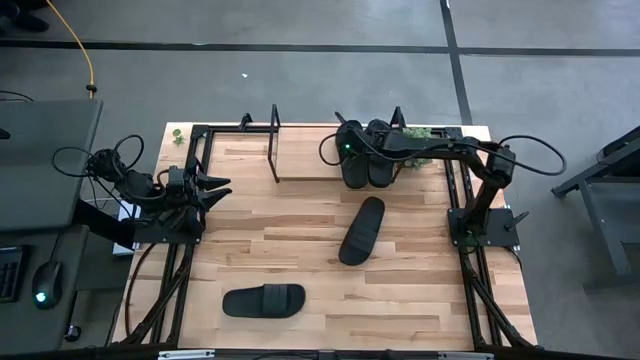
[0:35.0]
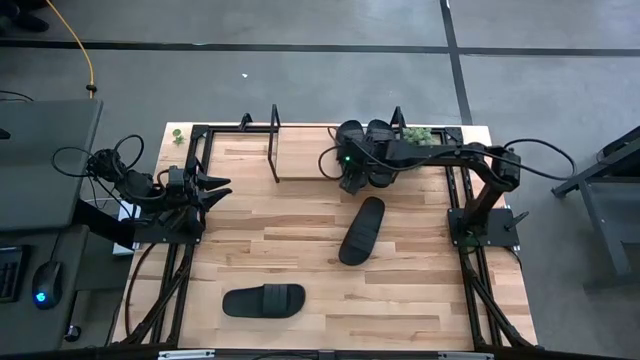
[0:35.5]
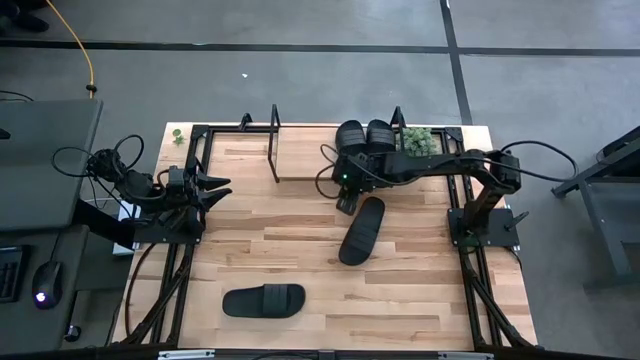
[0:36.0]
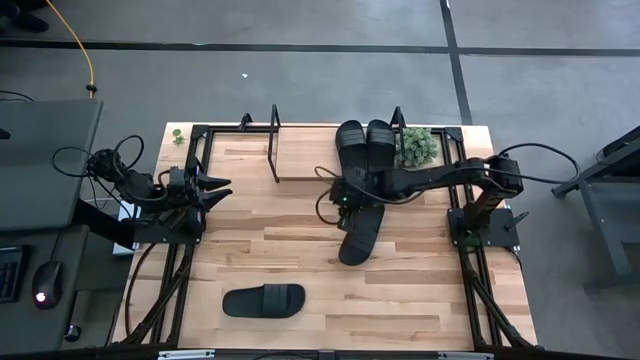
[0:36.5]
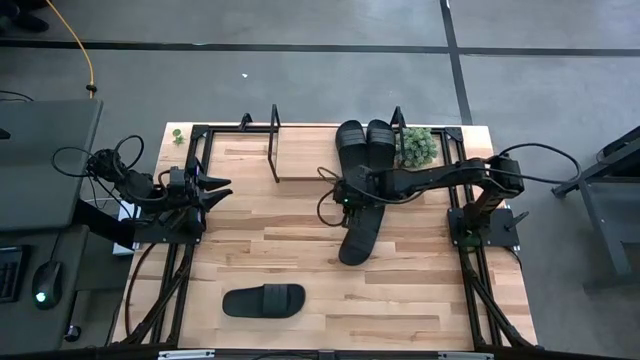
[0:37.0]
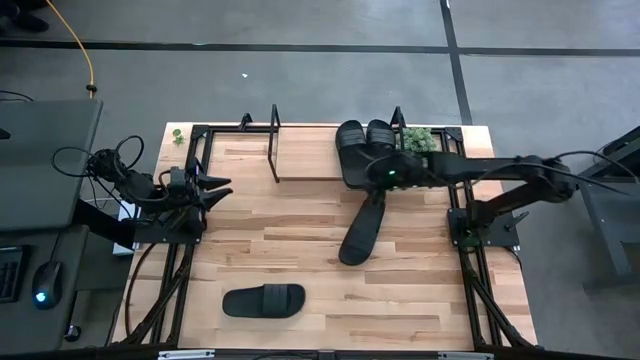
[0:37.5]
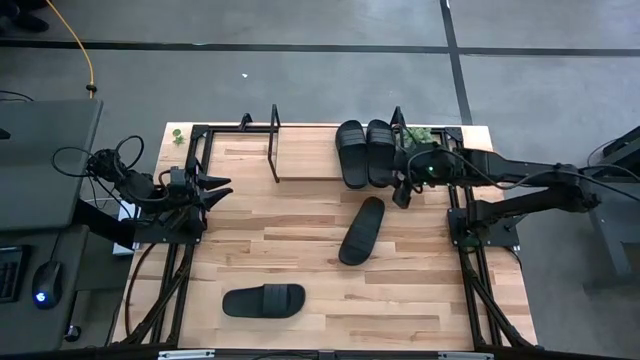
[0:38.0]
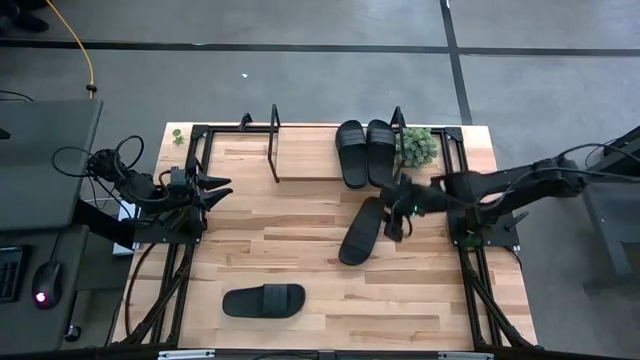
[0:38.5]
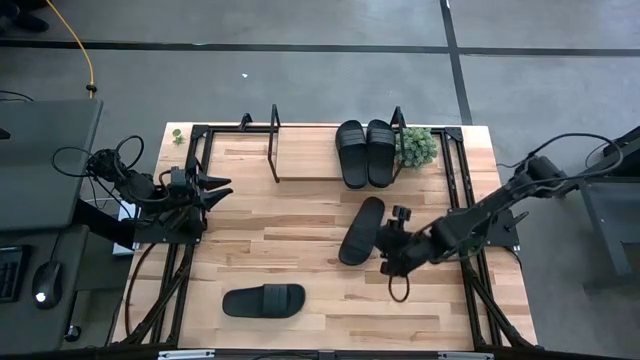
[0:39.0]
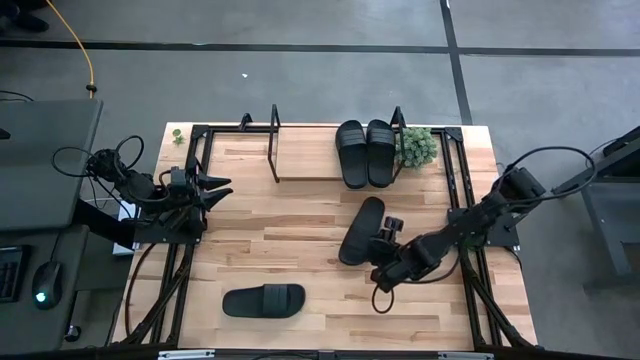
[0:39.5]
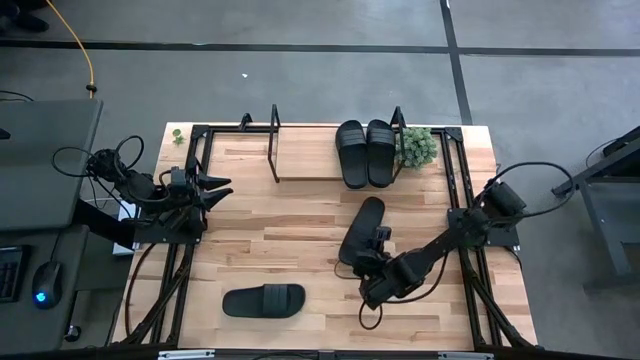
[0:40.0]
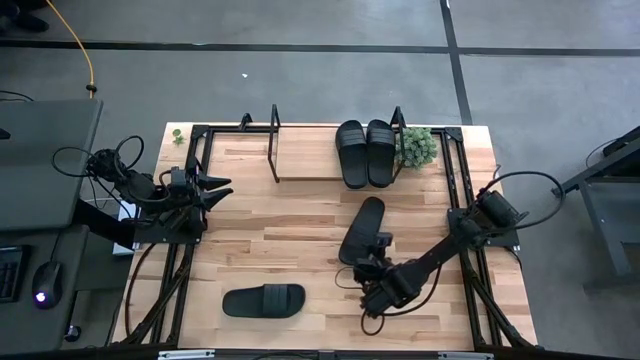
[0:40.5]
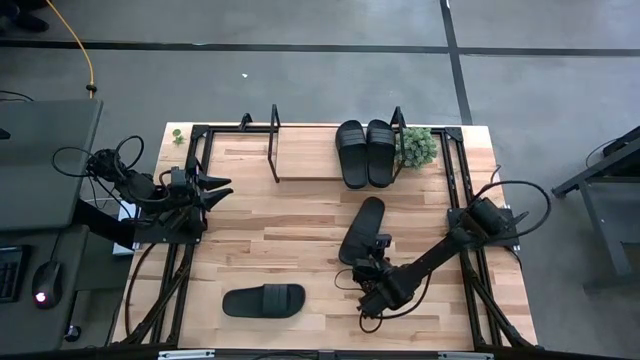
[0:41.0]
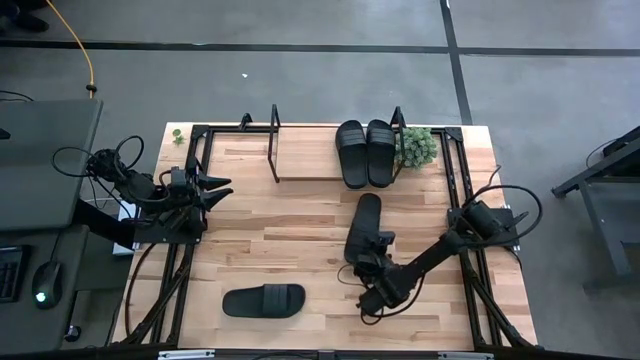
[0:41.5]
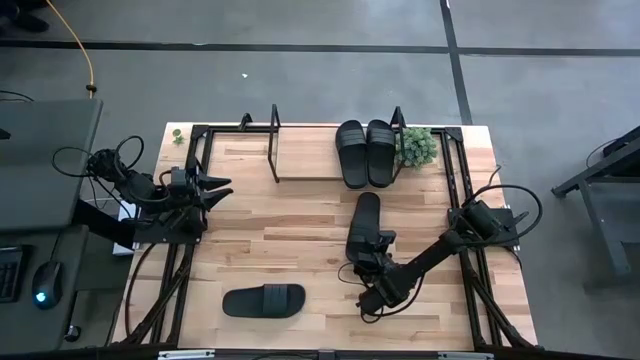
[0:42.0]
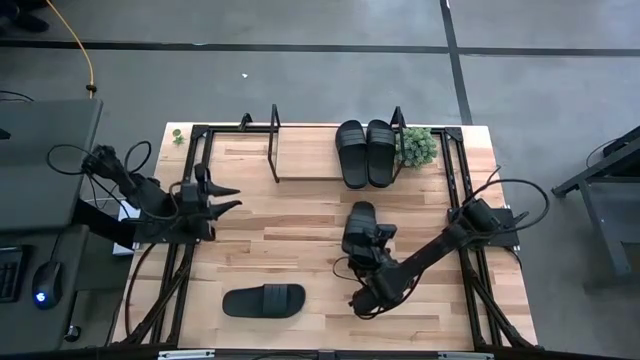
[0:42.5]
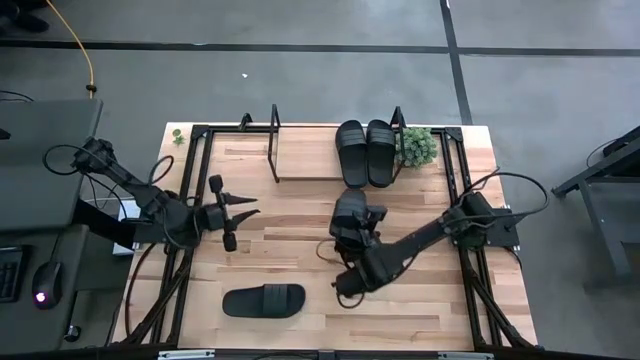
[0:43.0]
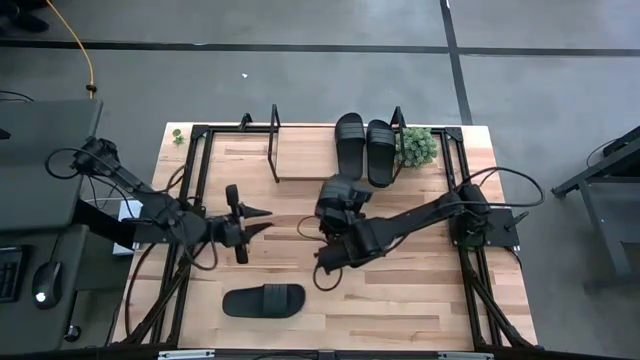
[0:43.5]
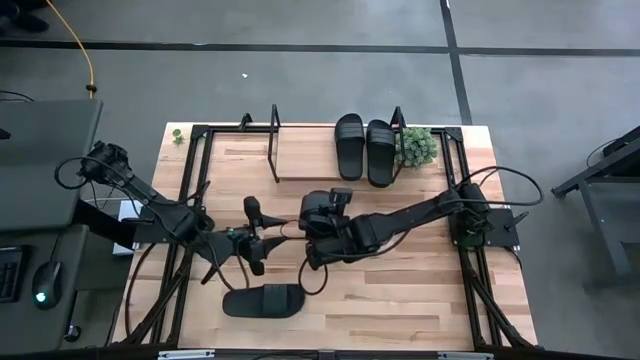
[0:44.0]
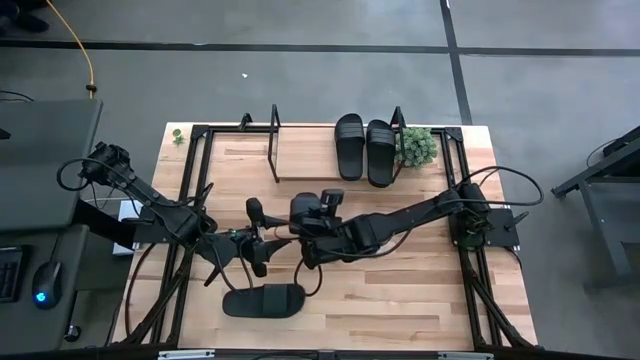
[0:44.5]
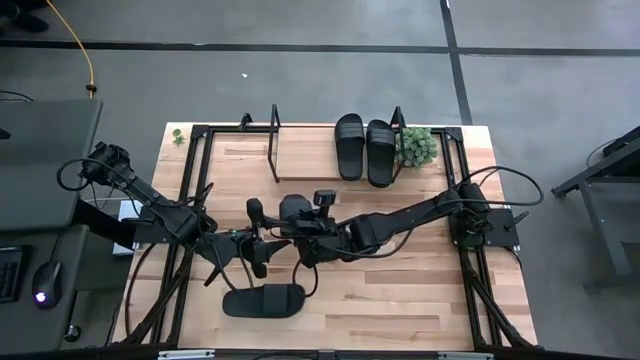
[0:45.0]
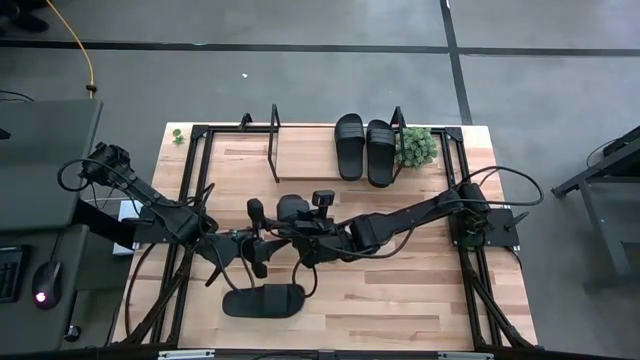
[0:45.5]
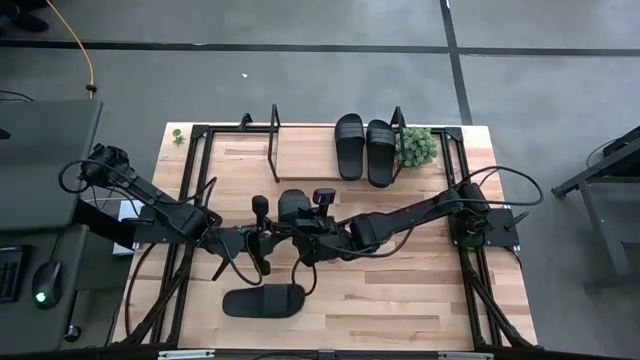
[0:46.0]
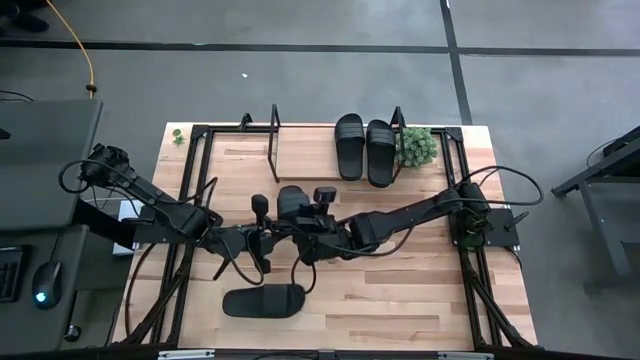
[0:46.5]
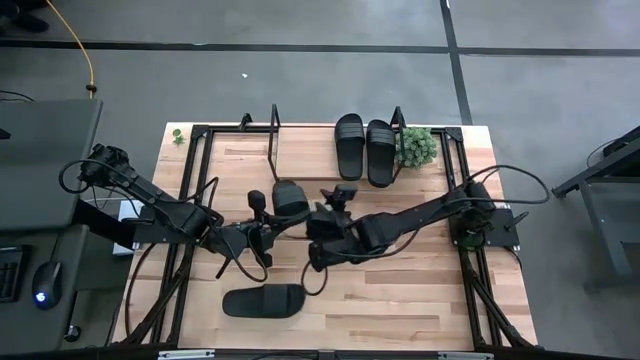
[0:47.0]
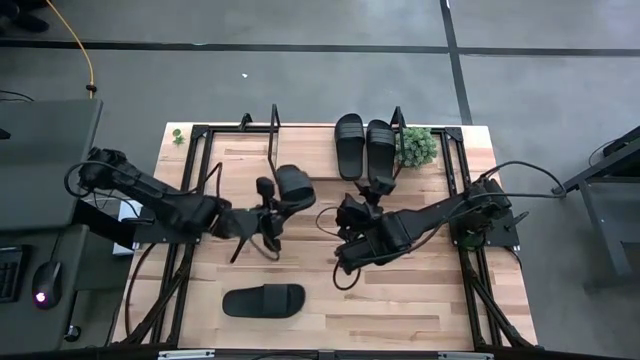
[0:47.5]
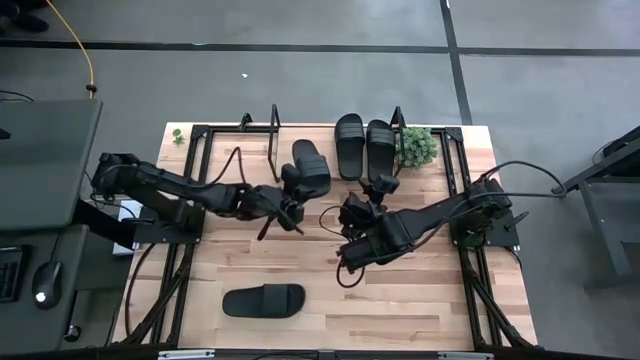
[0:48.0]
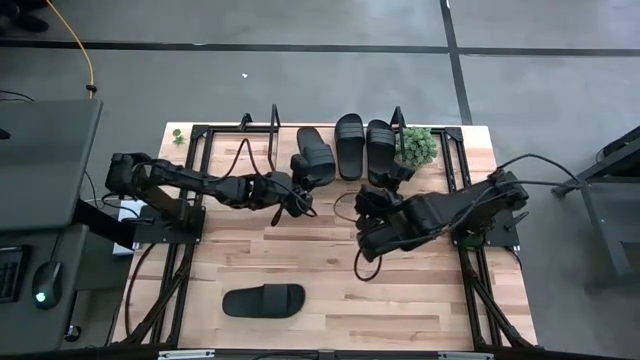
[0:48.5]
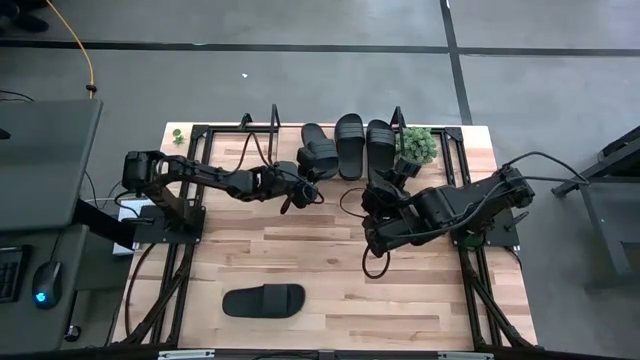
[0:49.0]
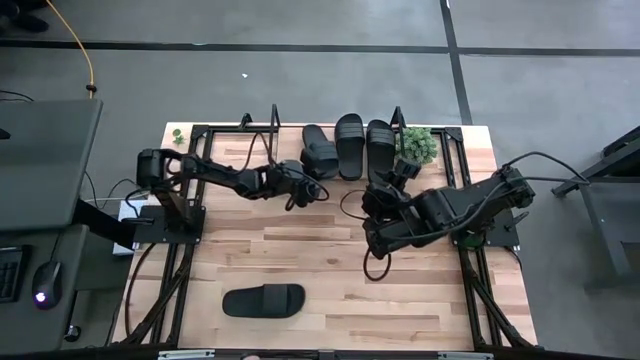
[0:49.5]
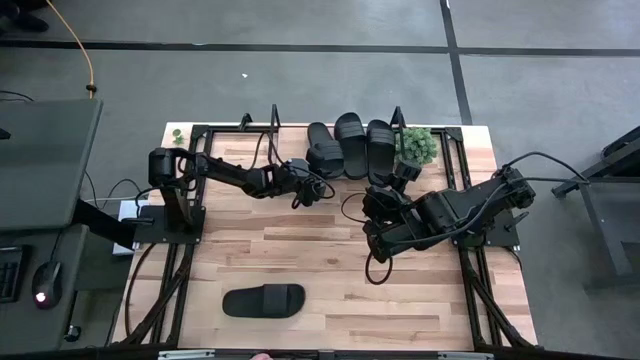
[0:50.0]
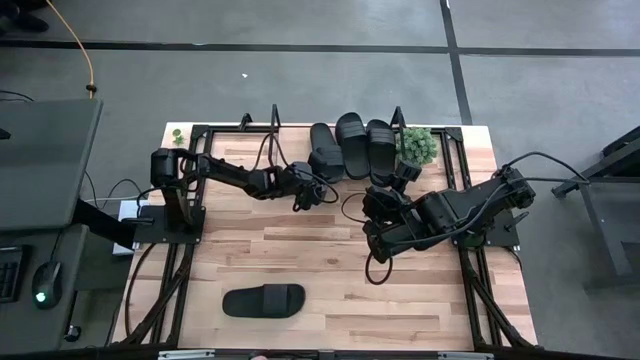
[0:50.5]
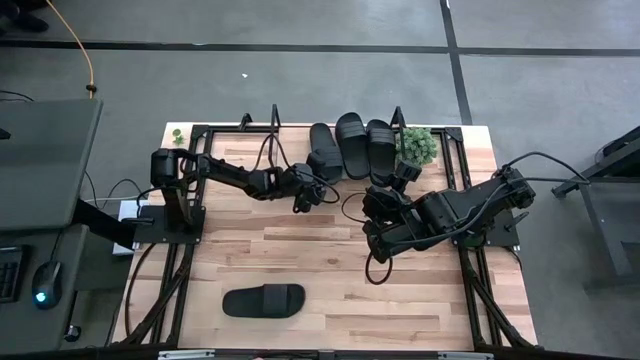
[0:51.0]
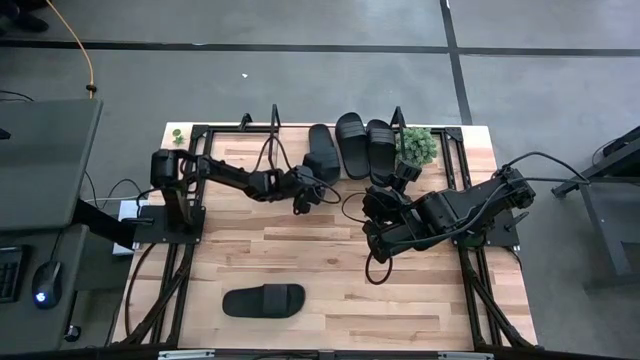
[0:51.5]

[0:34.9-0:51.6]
Task: Pick and place slides into the shelf
Put the black slipper on the shelf
